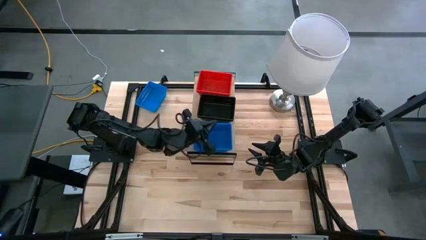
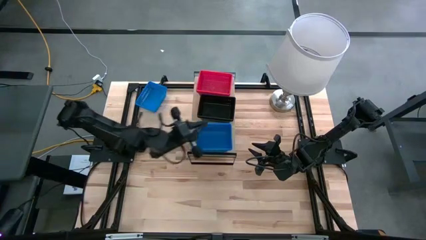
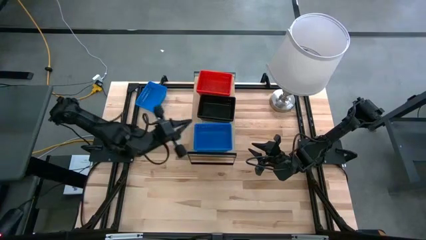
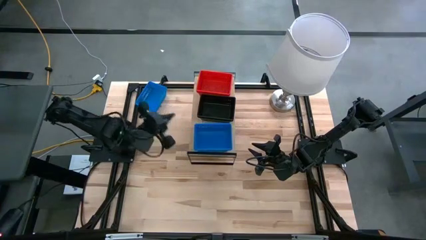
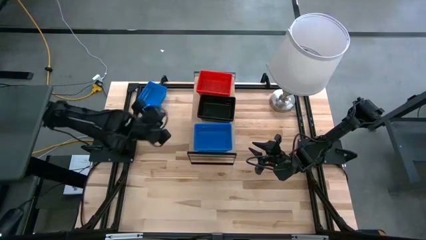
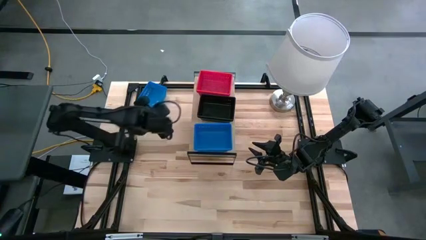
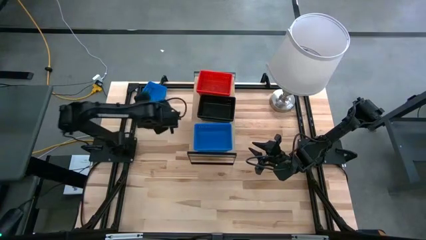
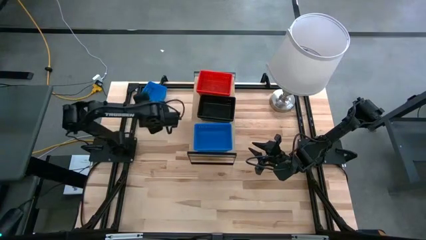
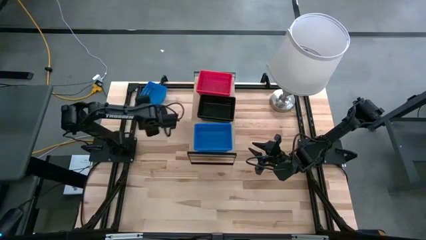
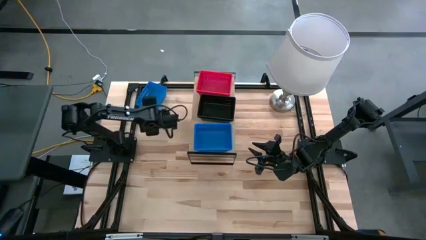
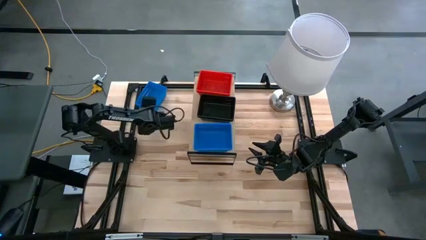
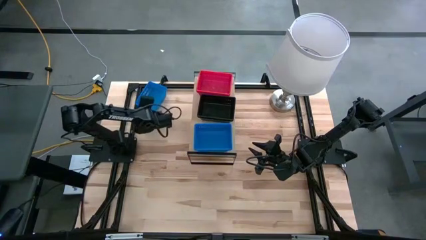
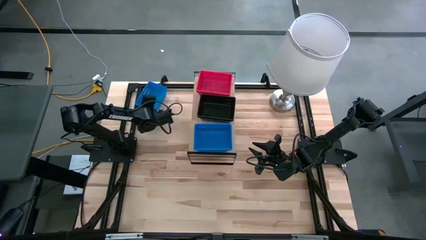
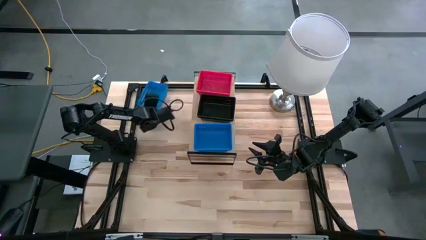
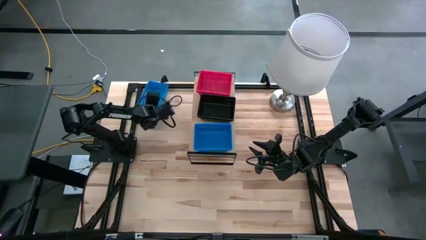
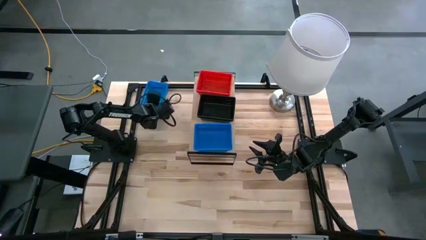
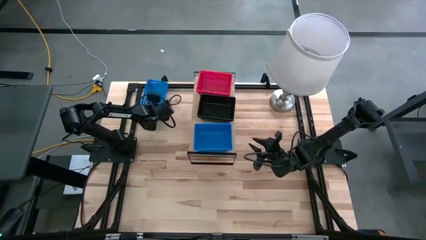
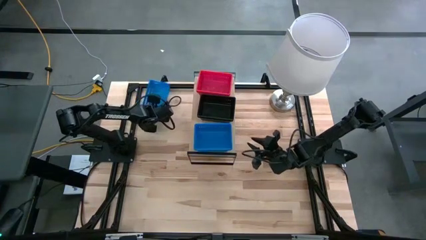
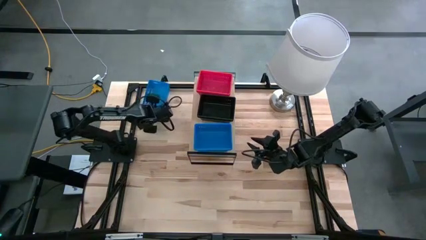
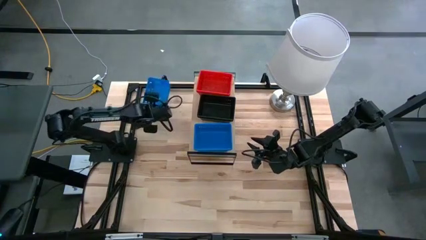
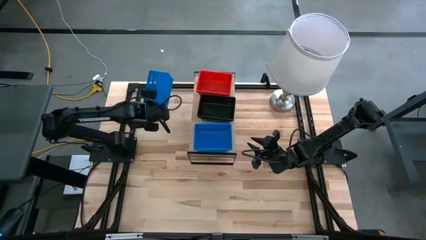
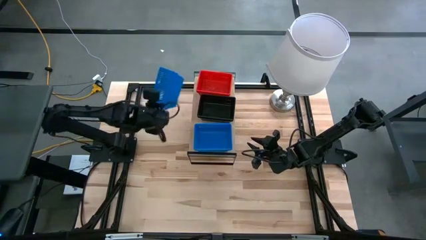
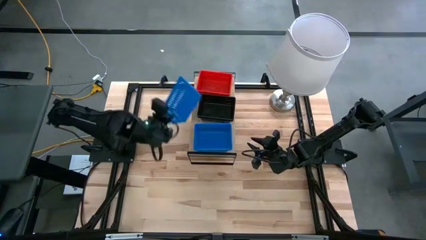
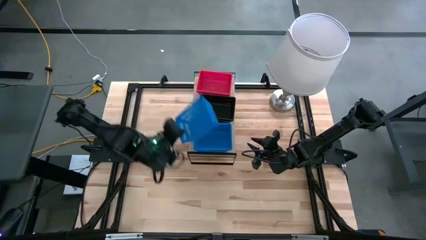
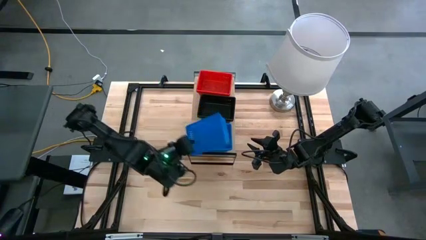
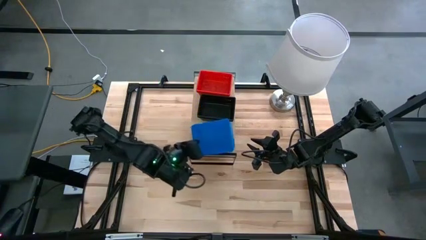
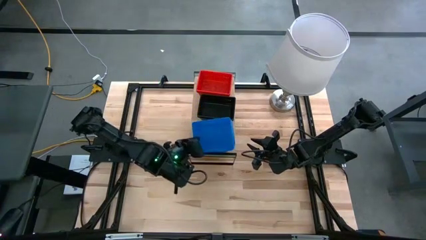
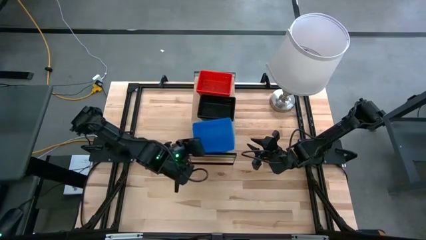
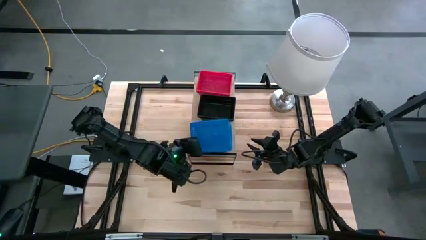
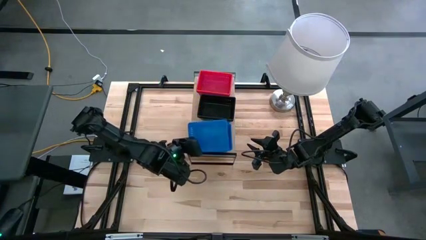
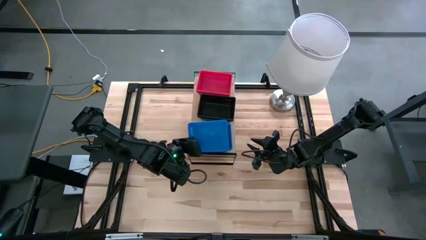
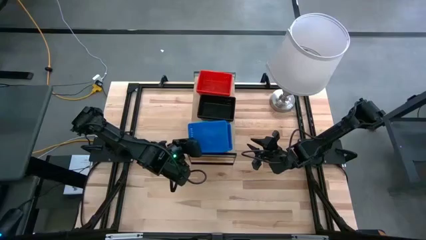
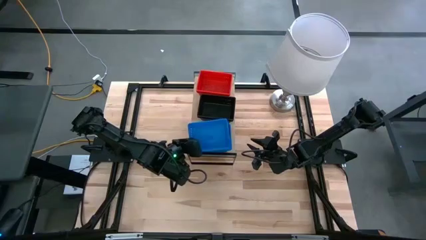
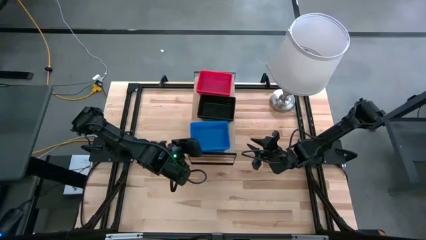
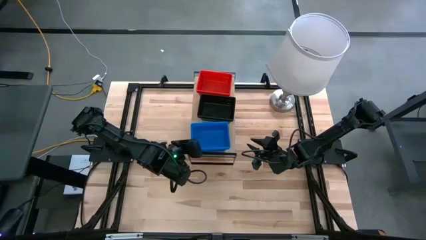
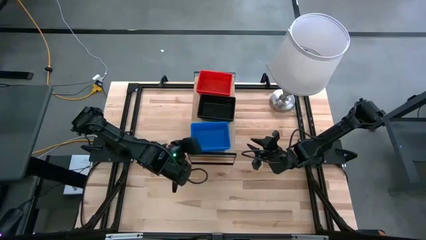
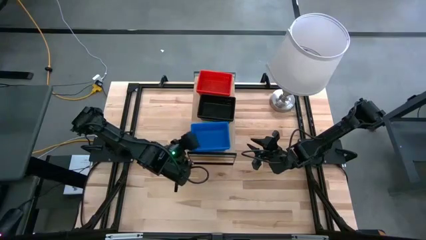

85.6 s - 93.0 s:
Task: Stack baskets on shelf by color
Stack the blue bin on top of the blue bin on the shelf

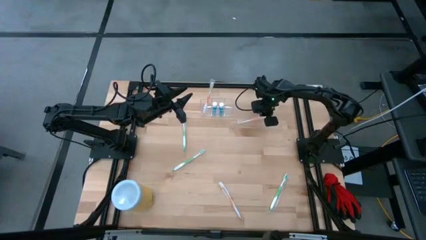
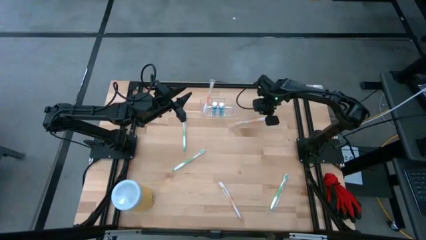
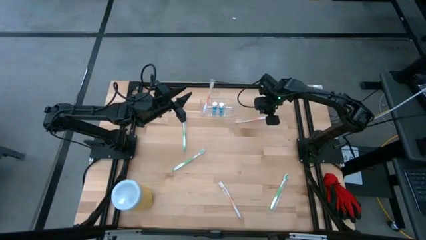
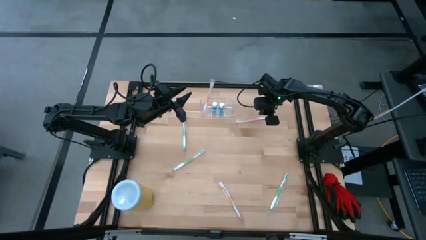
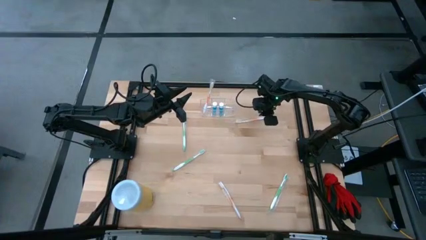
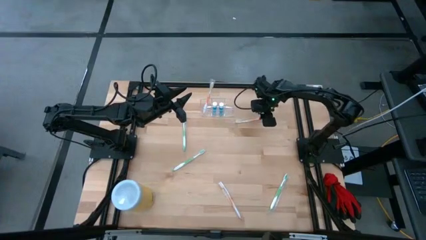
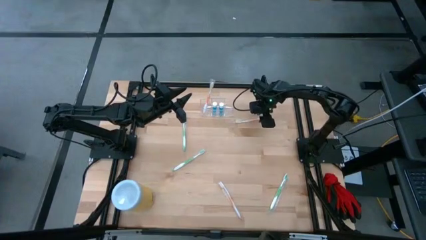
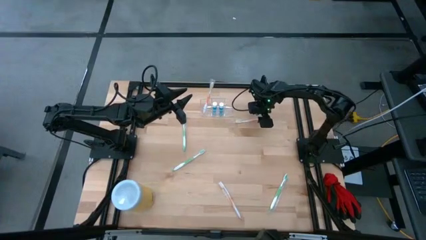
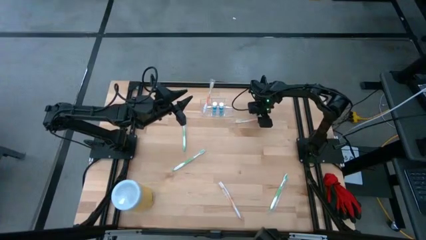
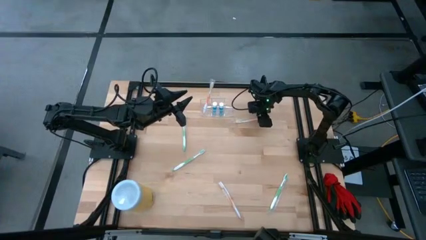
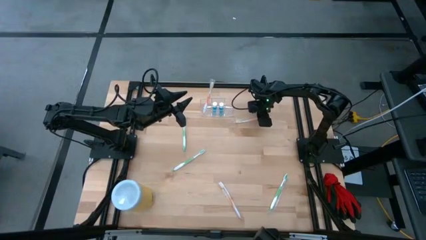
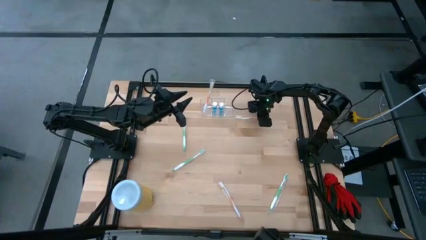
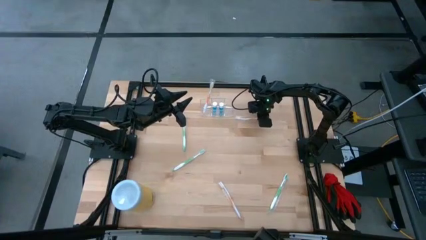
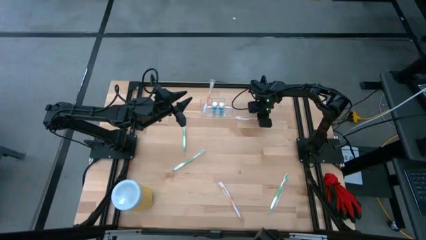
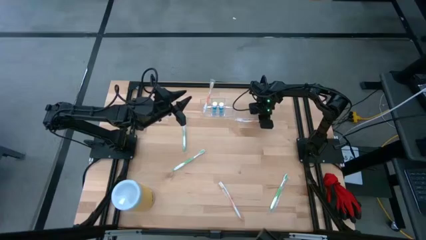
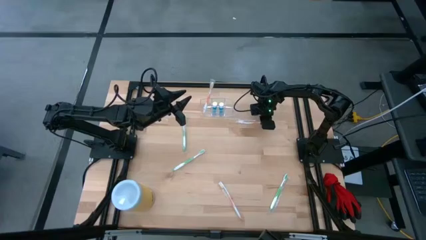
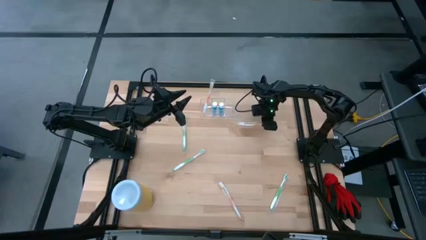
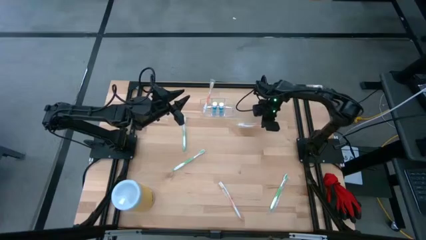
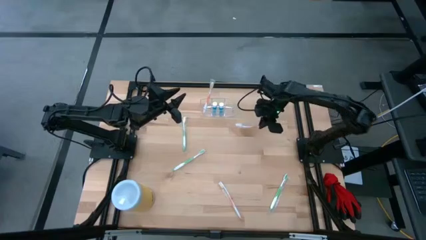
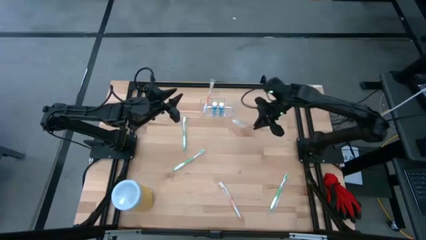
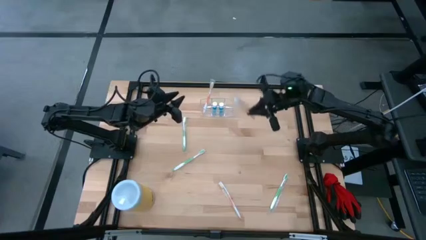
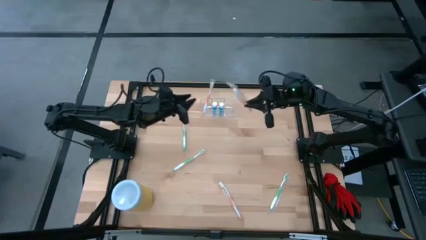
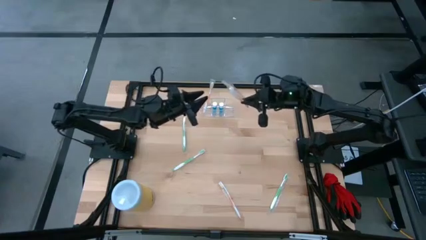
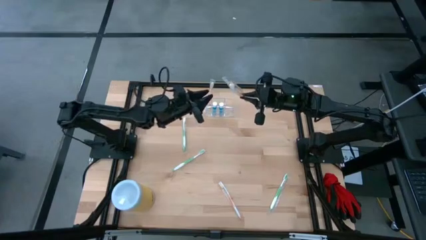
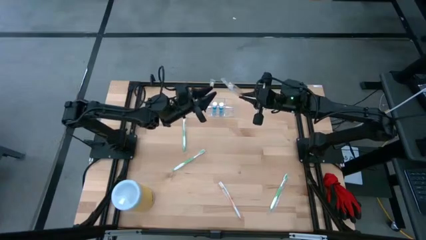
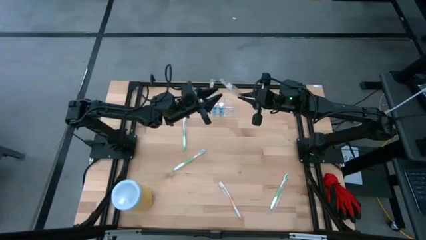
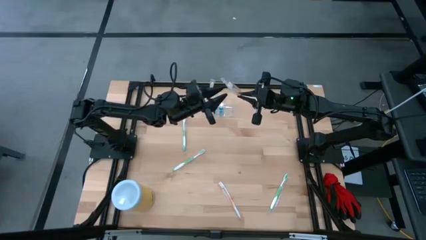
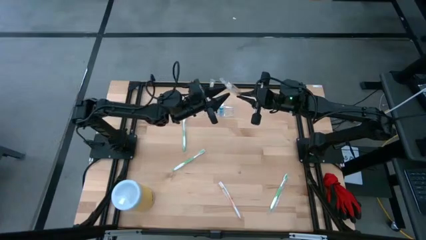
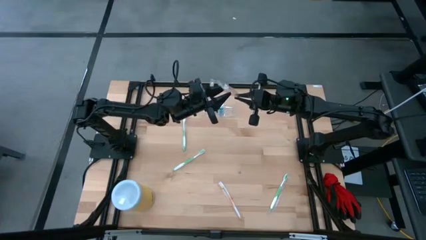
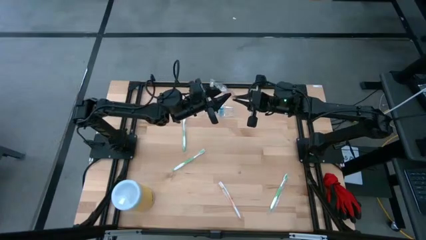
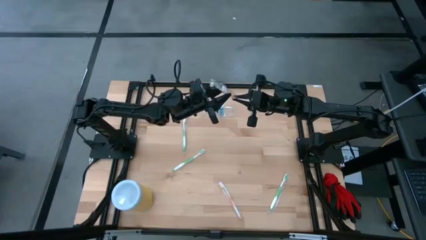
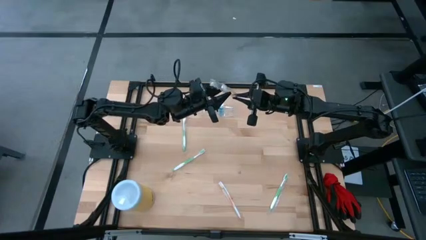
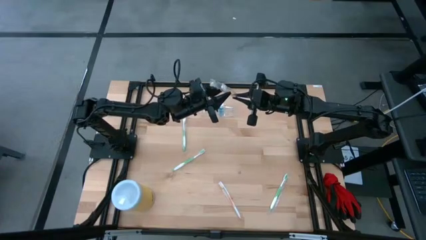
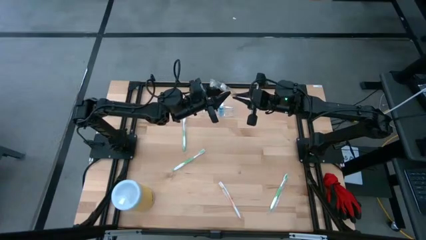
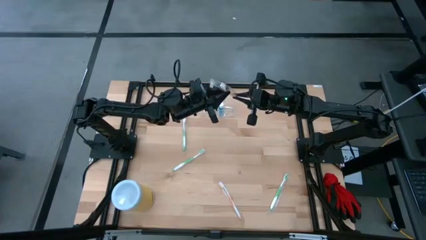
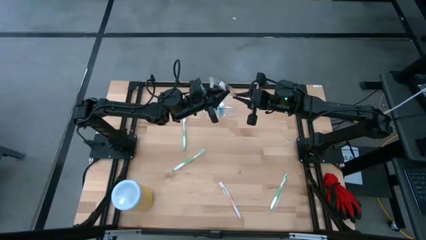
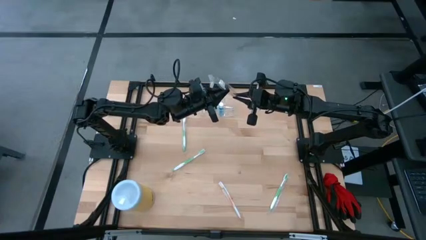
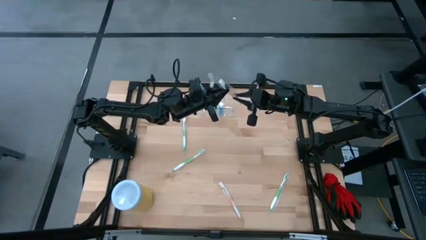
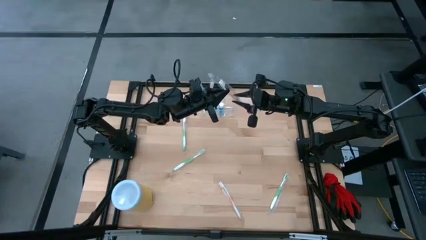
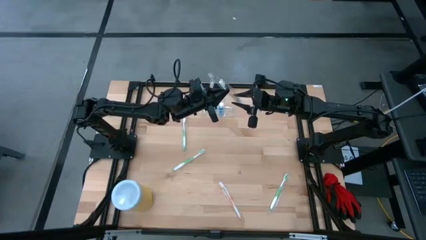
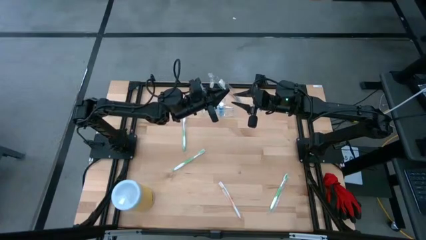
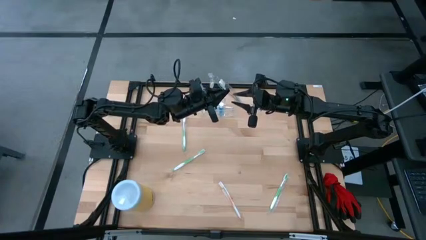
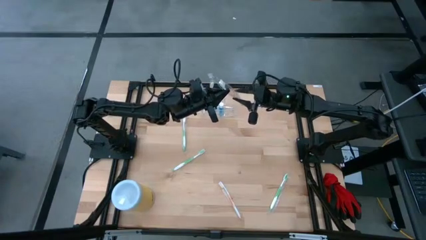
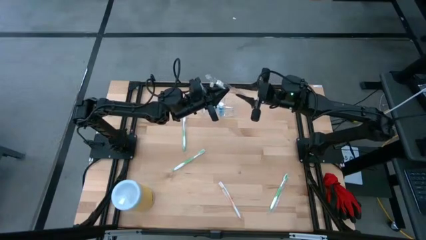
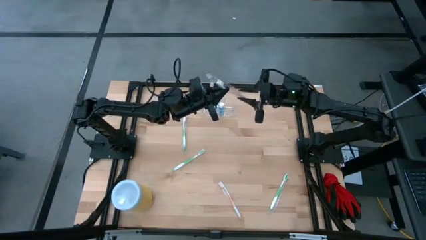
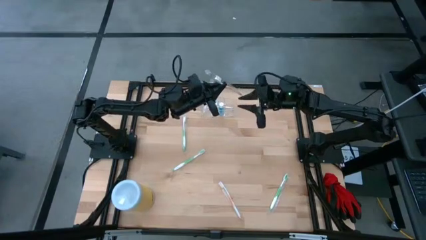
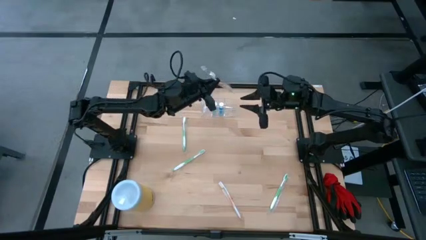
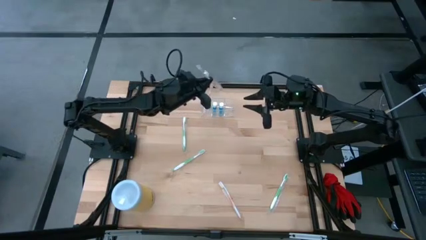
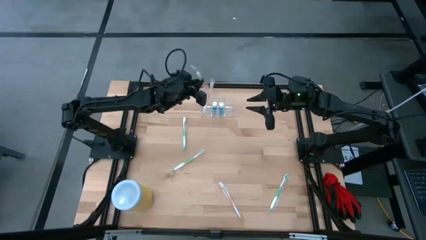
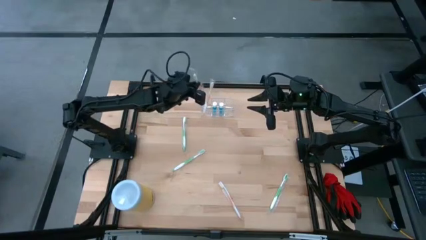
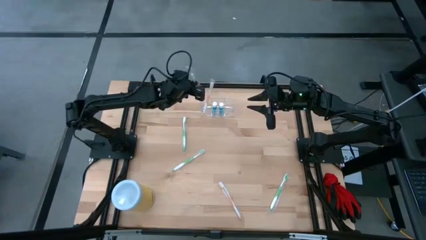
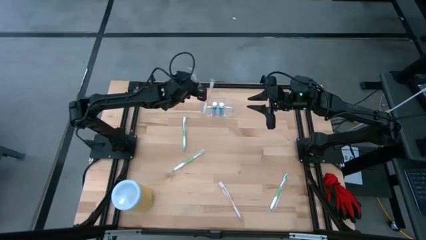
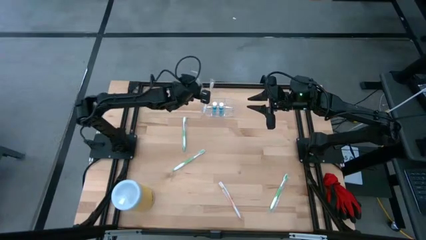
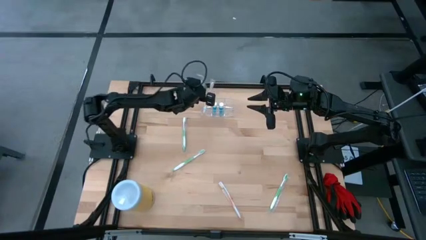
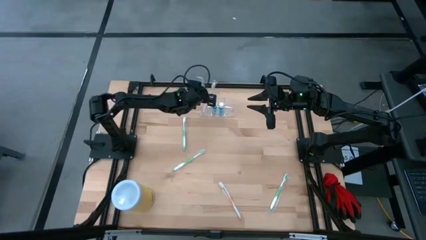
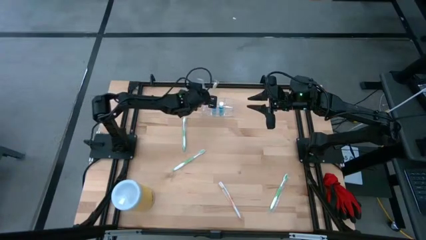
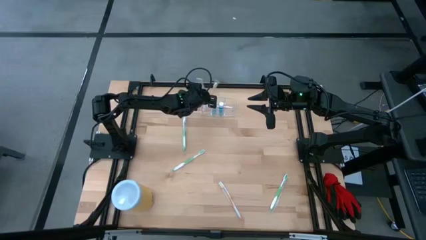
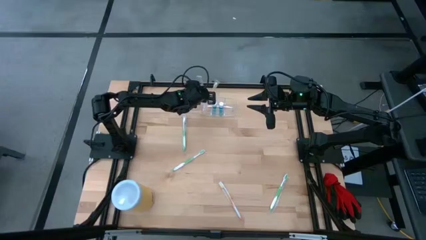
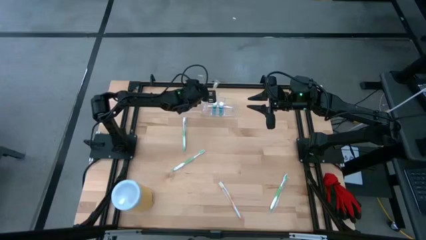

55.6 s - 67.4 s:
Task: Pick & Place toothbrushing station
Put the top orange toothbrush into the transparent organizer
